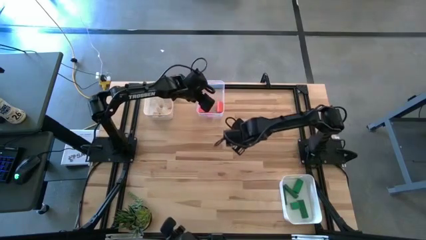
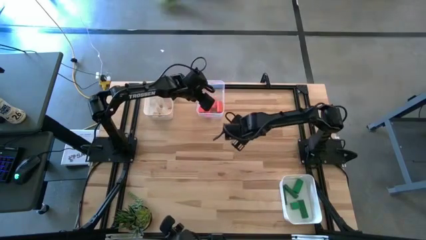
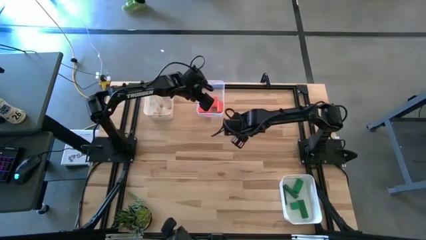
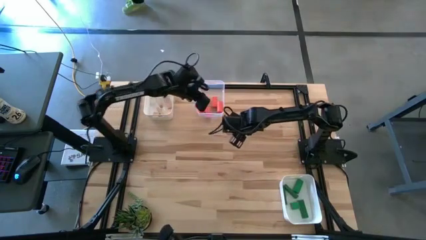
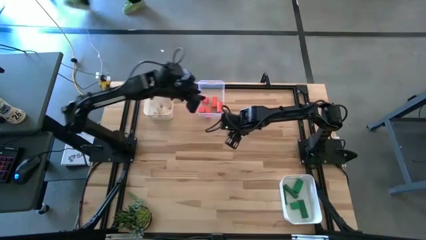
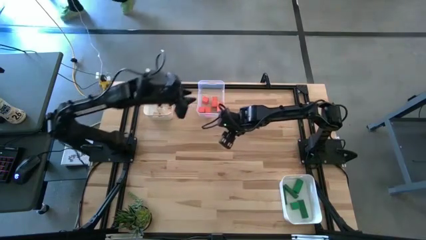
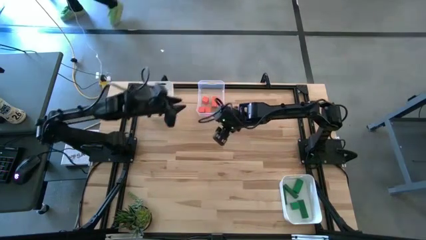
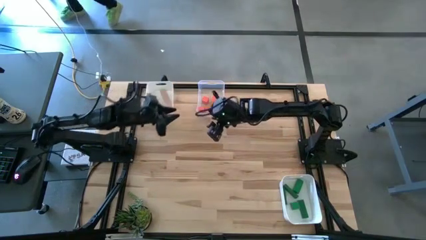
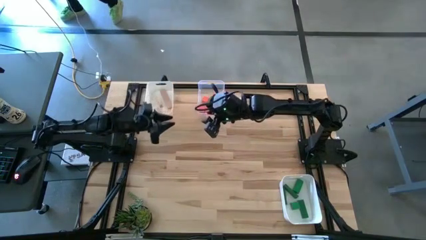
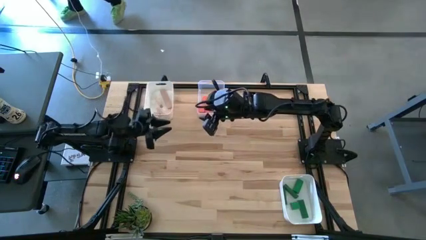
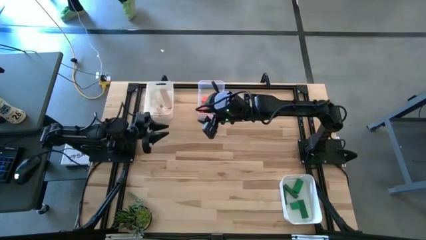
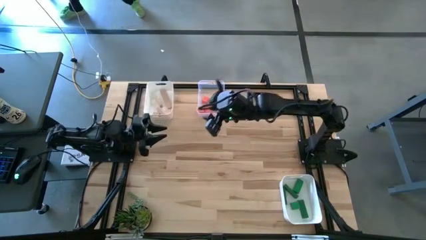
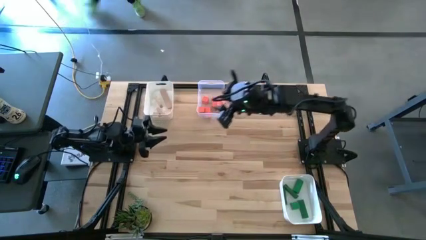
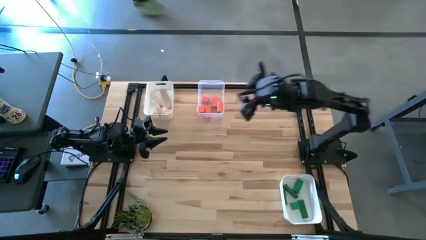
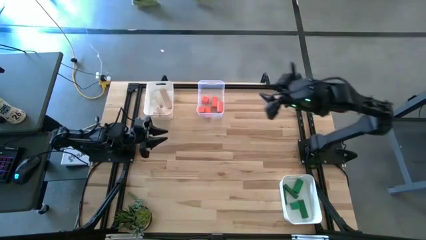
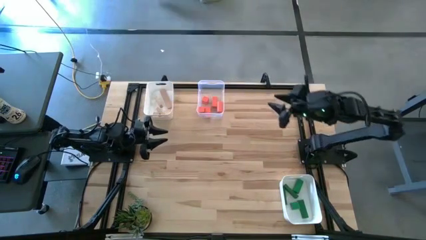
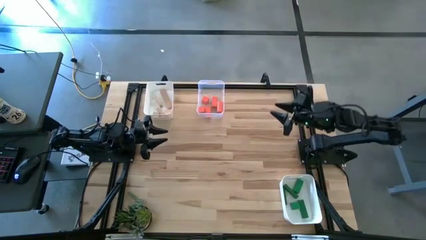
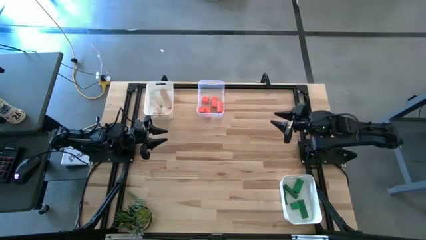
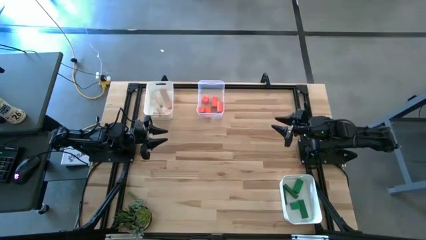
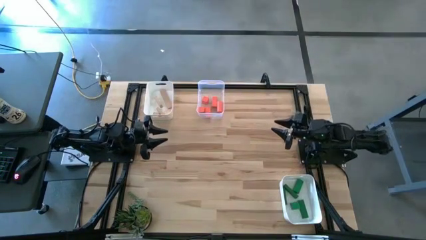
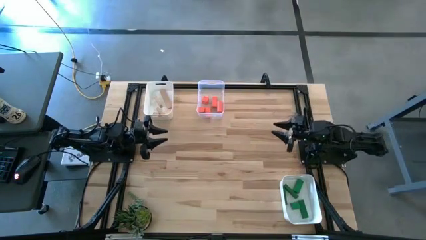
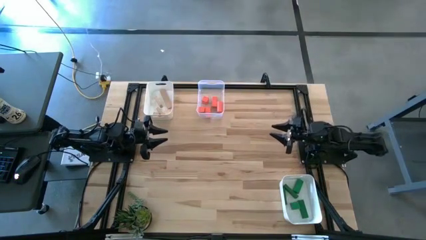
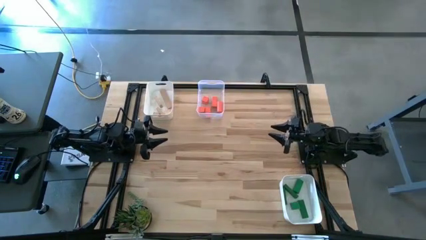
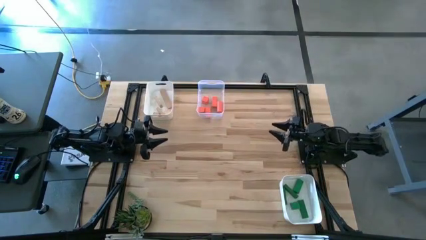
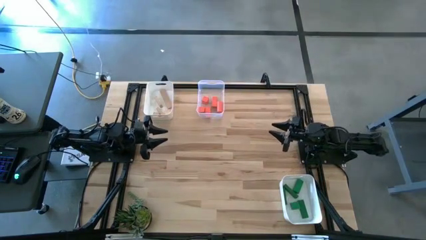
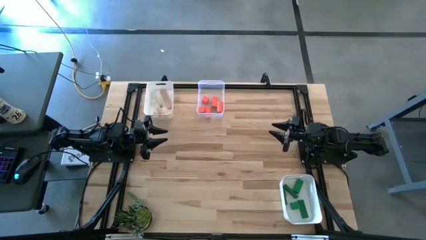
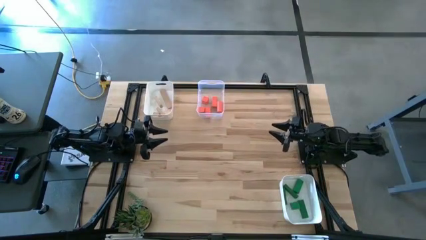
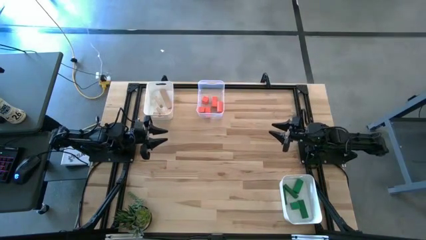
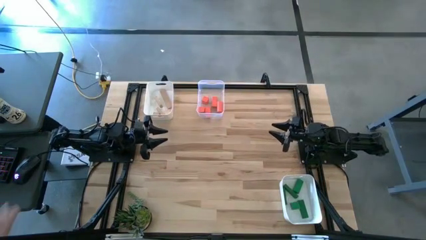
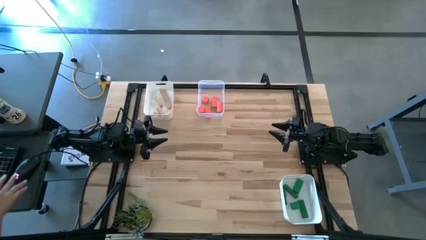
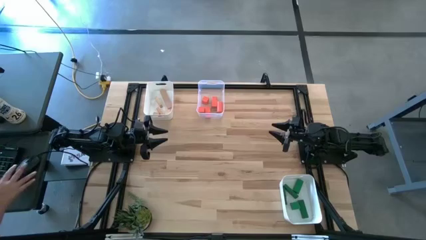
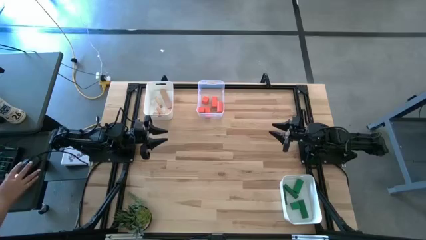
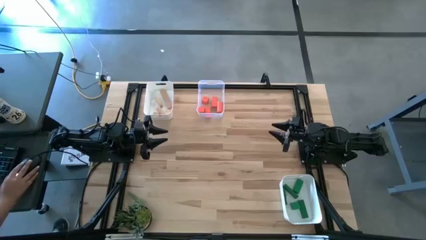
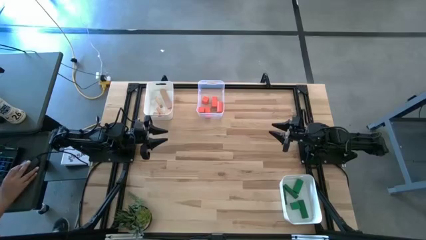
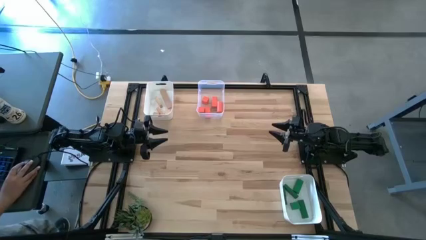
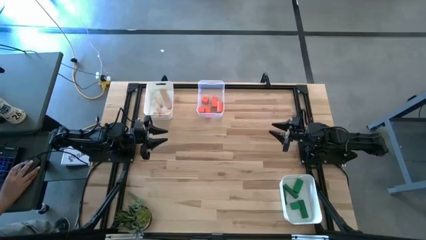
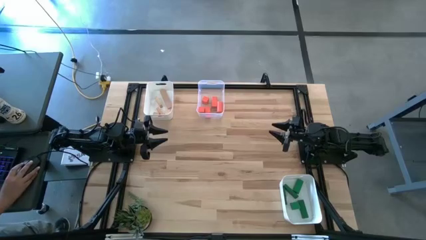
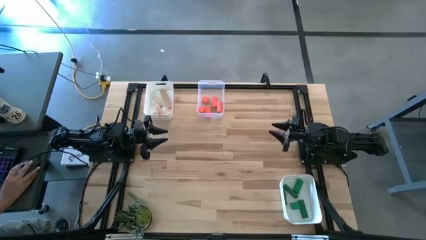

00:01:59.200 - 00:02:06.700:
Task: Sort & place blocks by color
Return to Home Position
